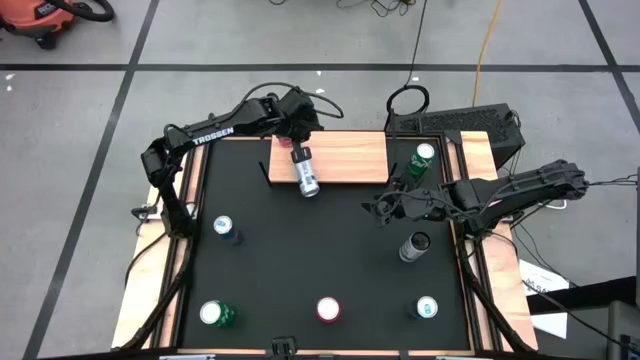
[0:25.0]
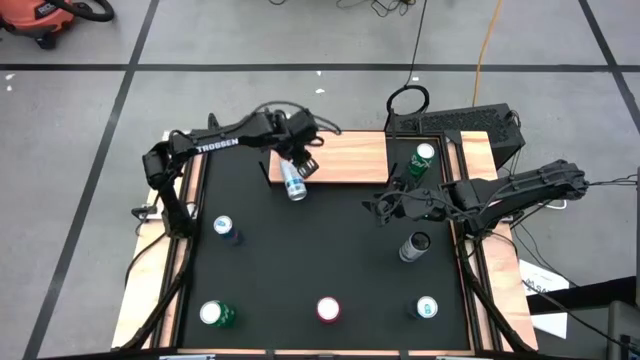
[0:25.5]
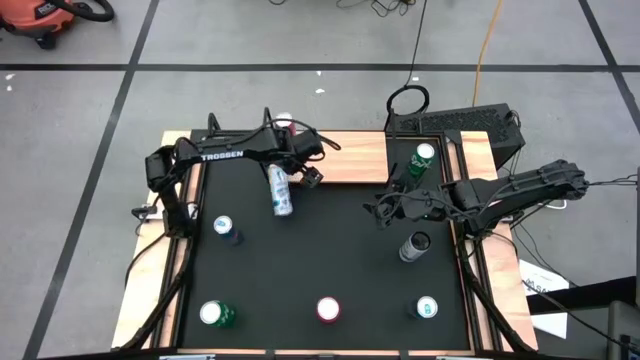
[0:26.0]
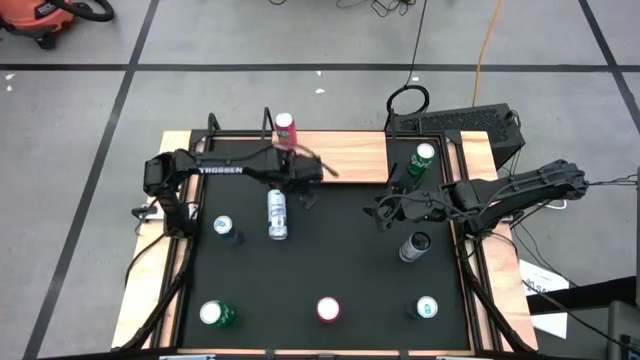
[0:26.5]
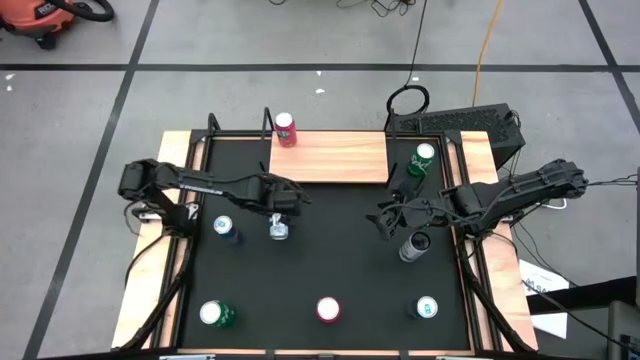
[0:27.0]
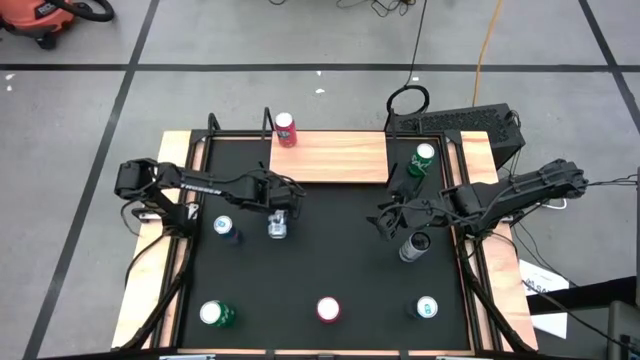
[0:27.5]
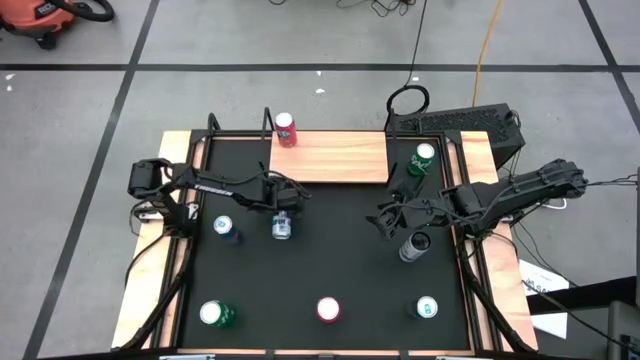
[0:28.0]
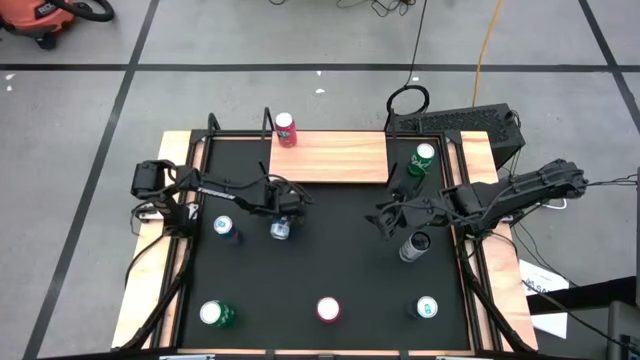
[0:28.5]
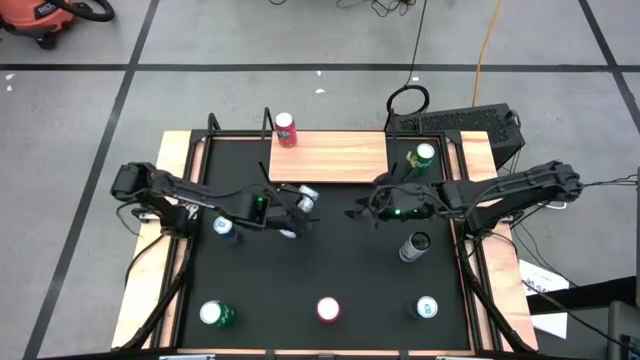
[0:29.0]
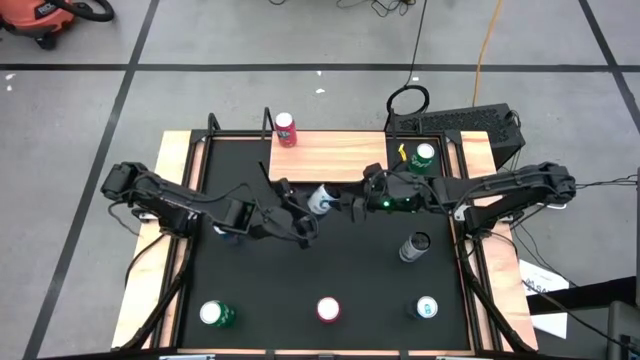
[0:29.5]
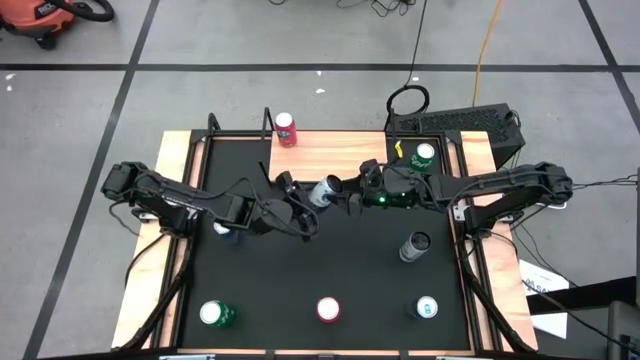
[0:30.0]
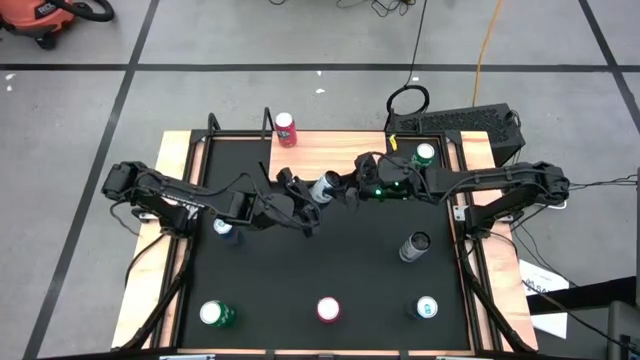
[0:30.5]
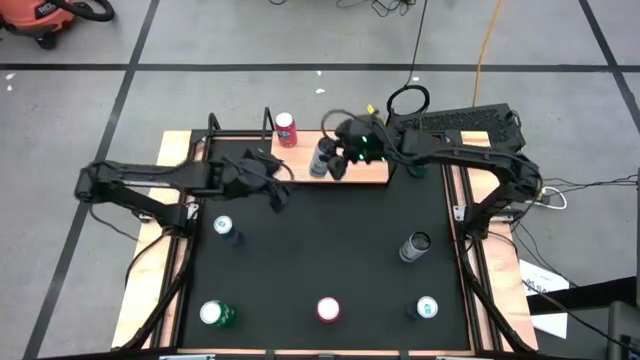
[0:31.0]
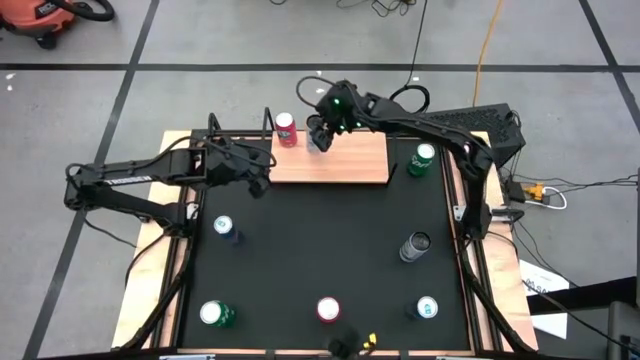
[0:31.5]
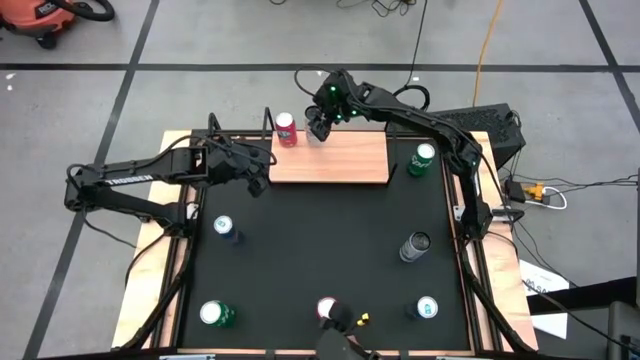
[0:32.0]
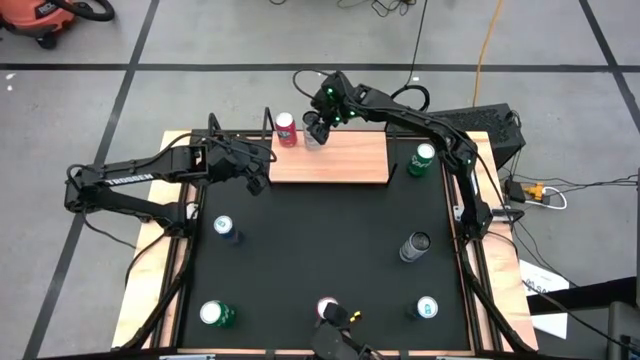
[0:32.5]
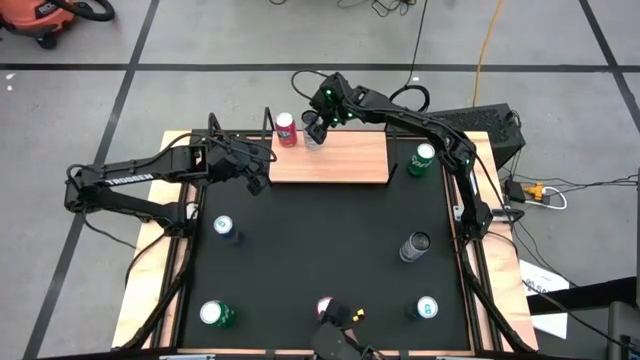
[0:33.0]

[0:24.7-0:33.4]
Task: Place canned beverage on shelf
Put the left white-blue soda can on the shelf

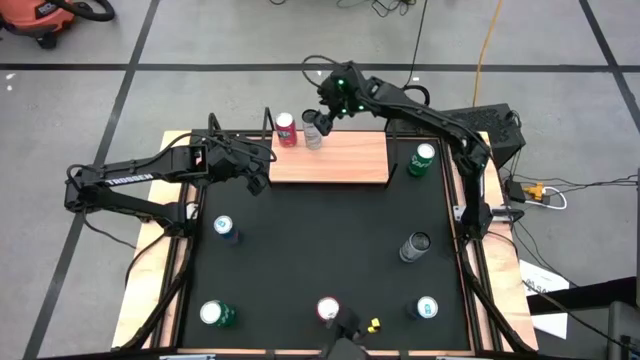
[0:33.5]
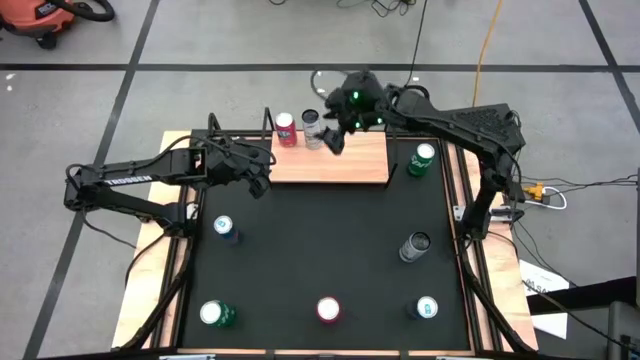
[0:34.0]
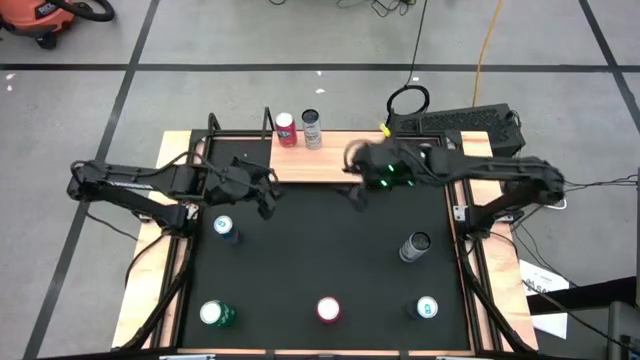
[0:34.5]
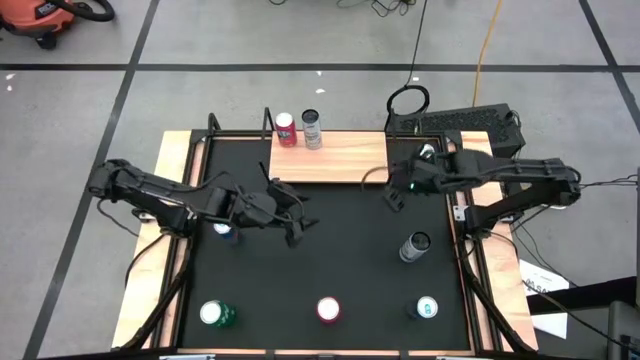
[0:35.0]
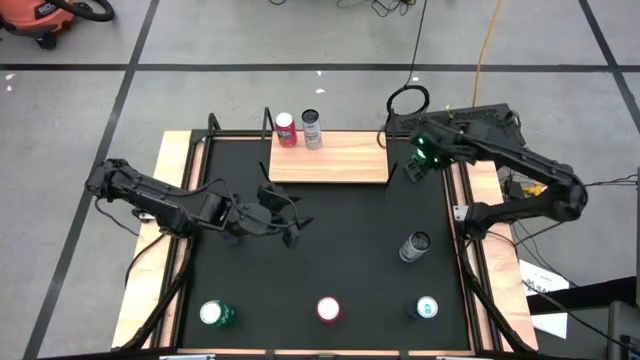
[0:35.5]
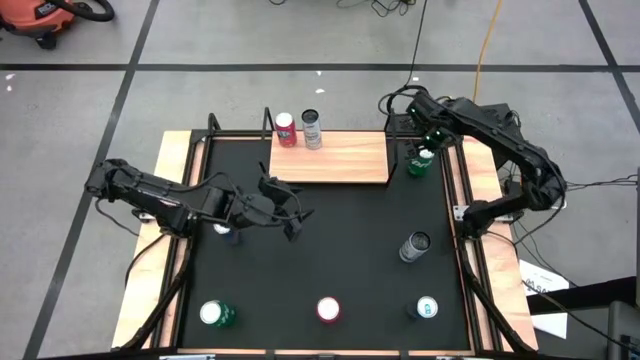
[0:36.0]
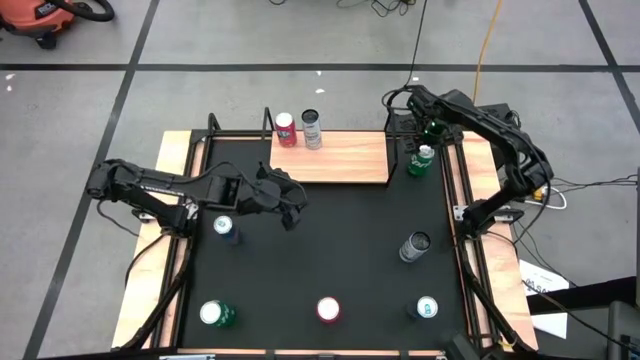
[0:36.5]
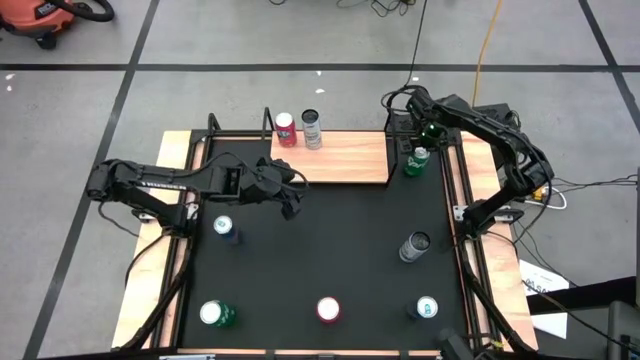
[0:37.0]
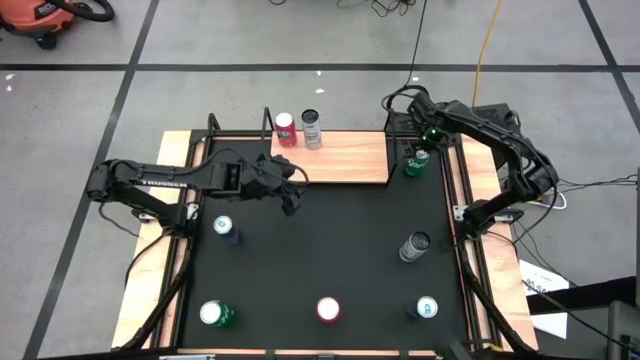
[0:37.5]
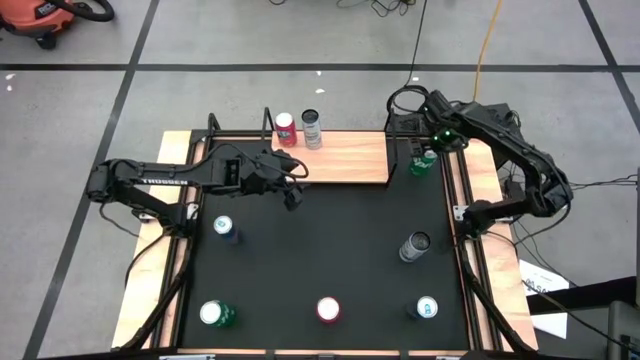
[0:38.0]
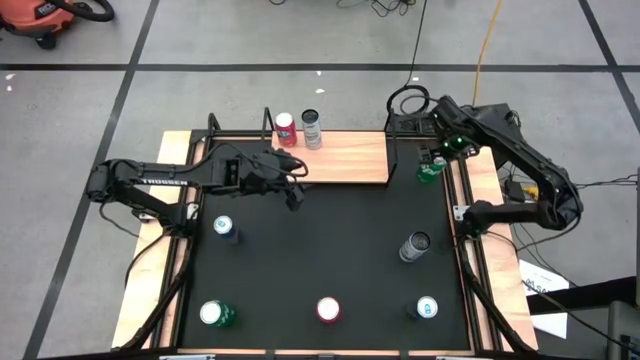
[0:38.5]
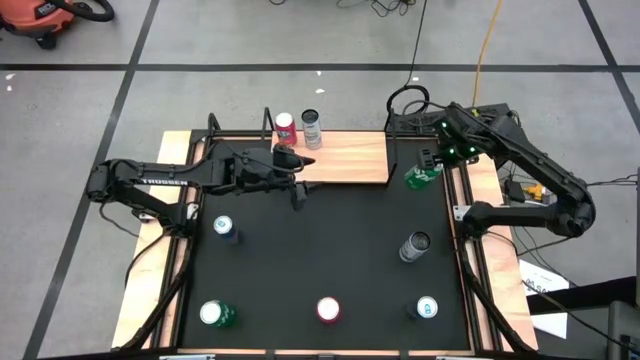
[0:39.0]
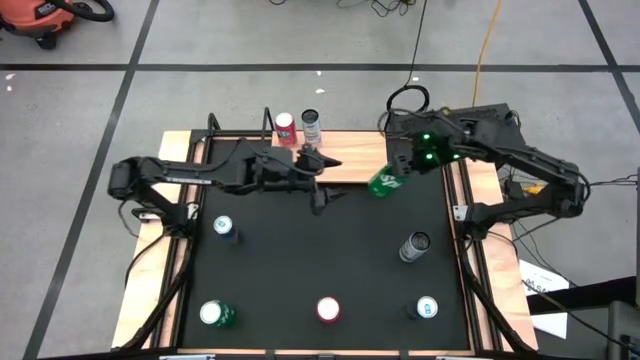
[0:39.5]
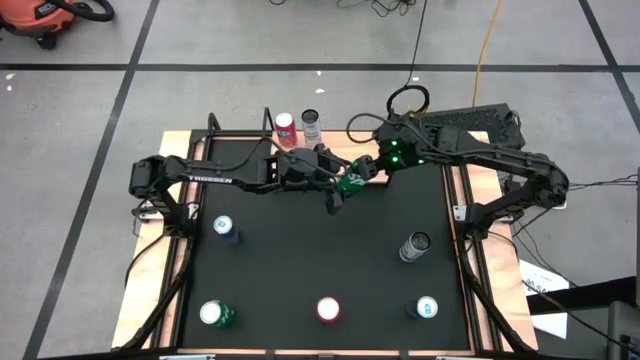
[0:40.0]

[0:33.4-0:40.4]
Put the top green soda can on the shelf

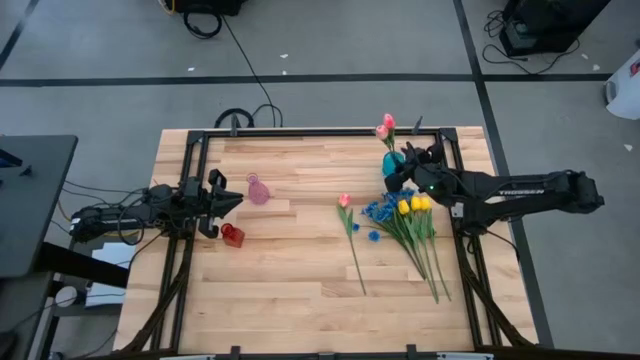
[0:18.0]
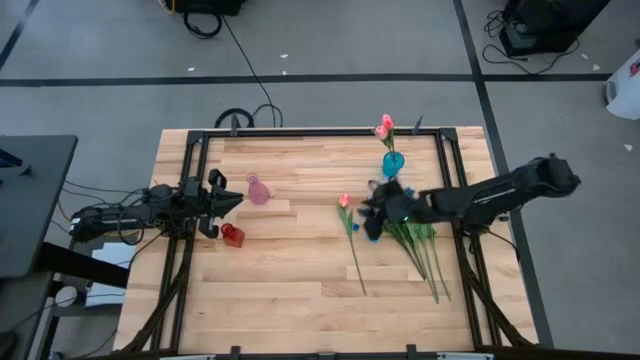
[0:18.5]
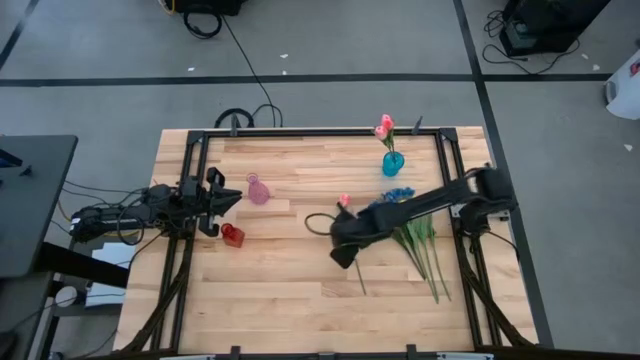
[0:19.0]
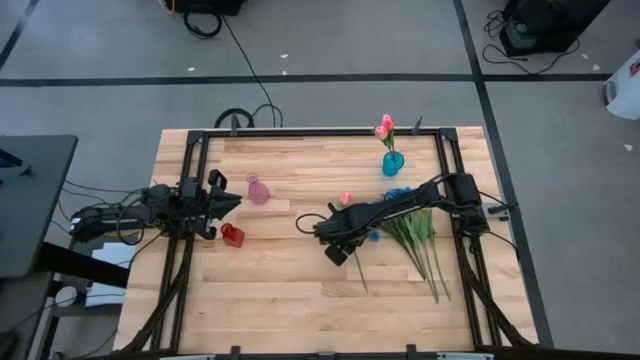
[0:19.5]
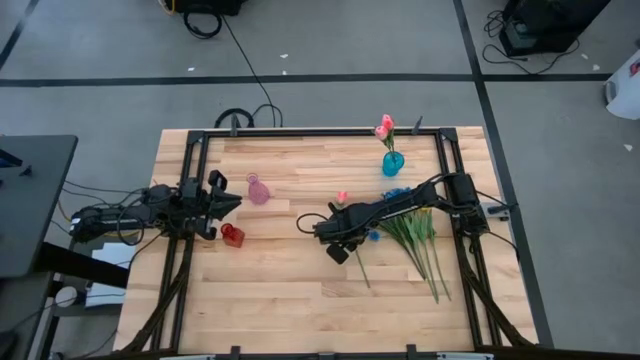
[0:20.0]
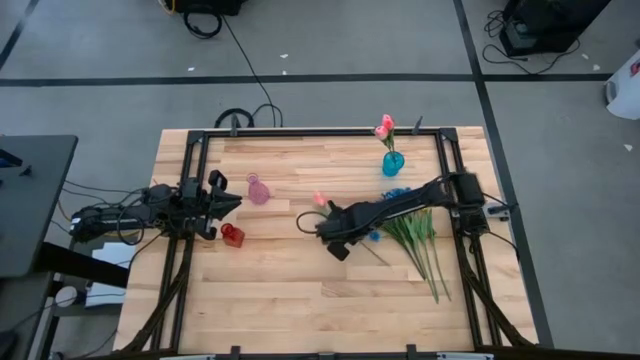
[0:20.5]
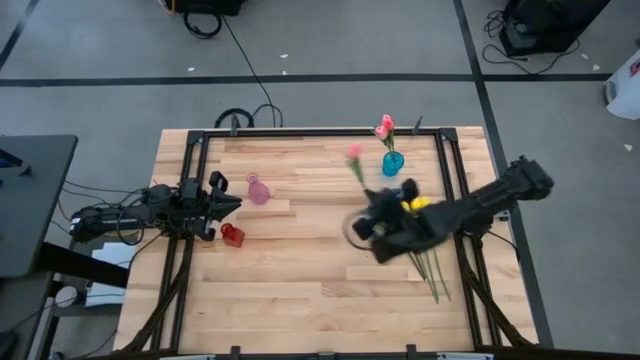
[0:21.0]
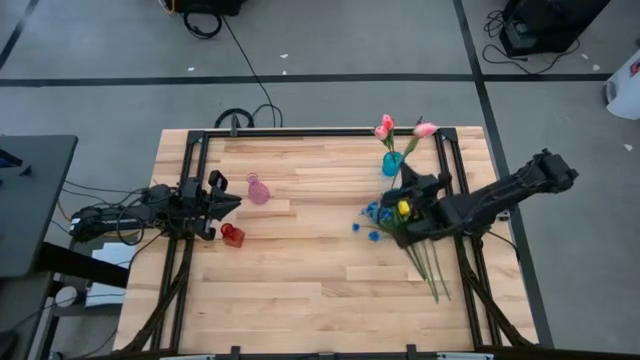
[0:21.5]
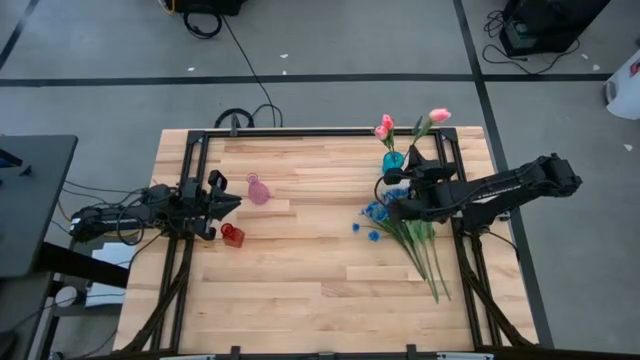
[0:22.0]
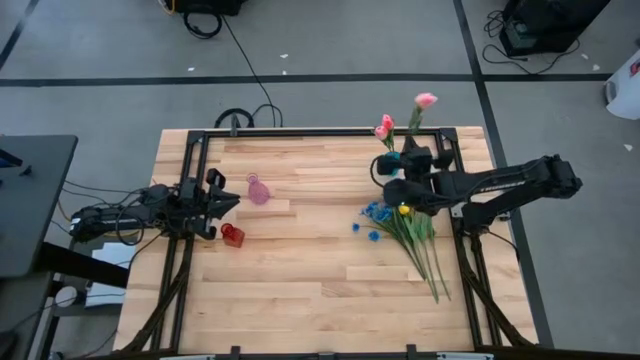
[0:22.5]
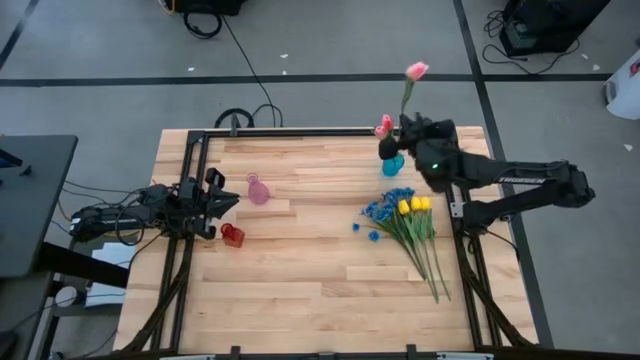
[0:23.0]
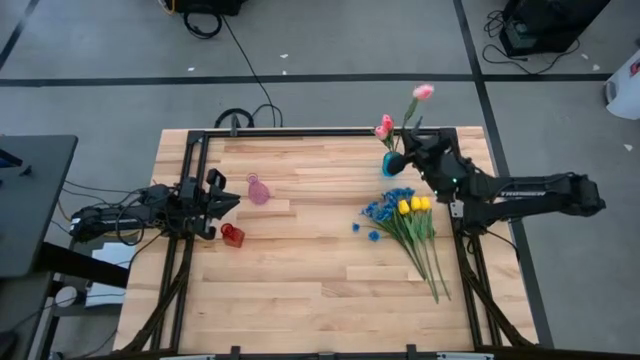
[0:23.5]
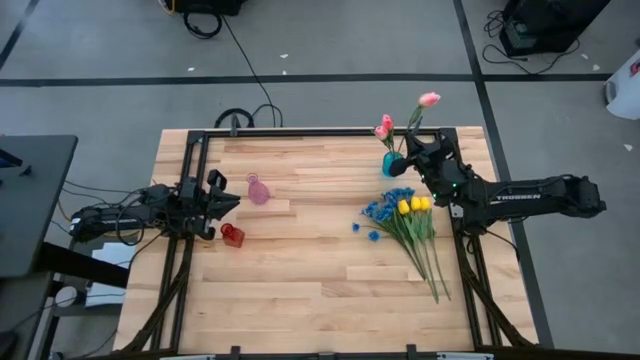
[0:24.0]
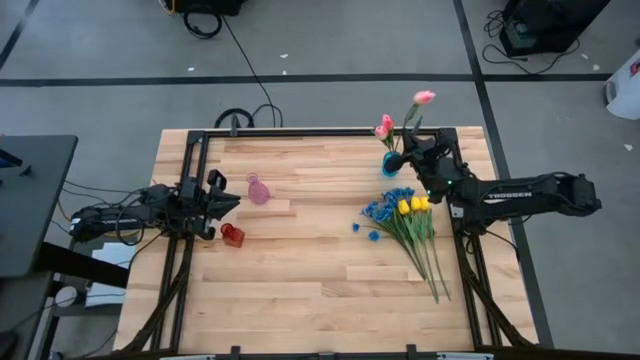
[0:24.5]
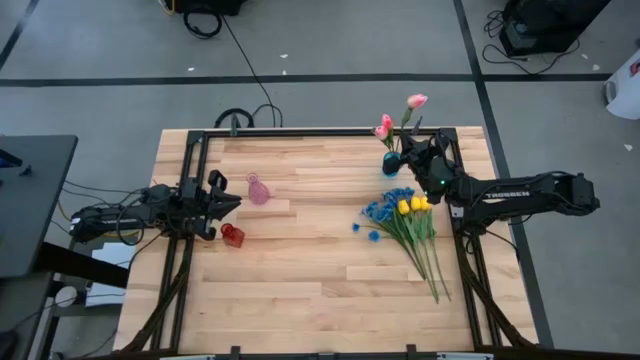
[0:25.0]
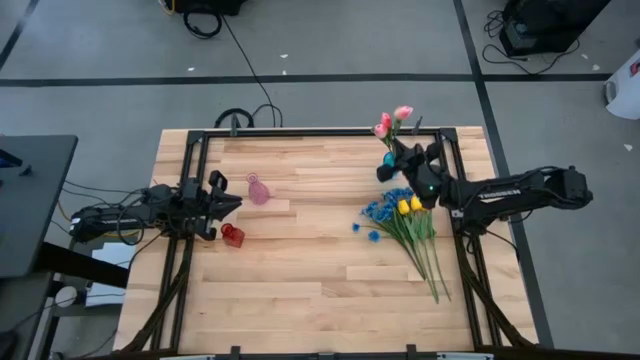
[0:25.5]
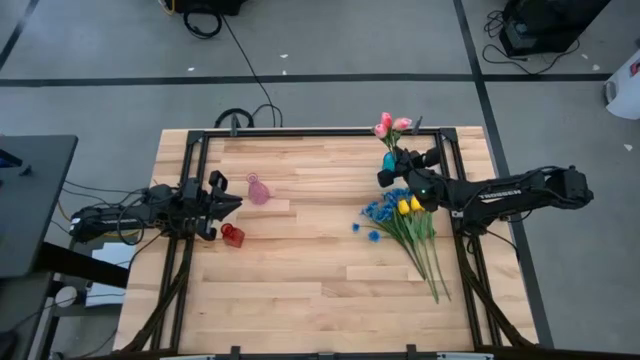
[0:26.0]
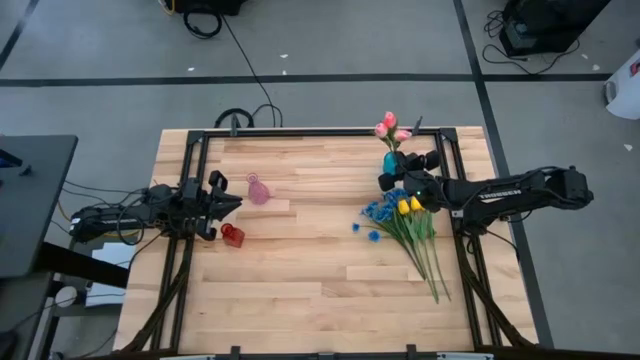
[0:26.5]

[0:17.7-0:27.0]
Task: Sort flowers into vase by color
Put the pink flower into the blue vase
